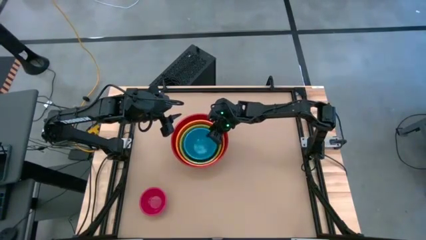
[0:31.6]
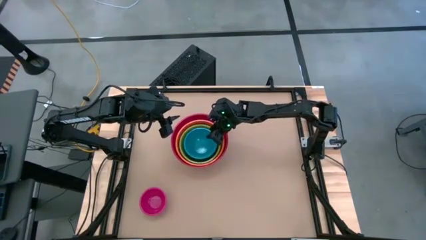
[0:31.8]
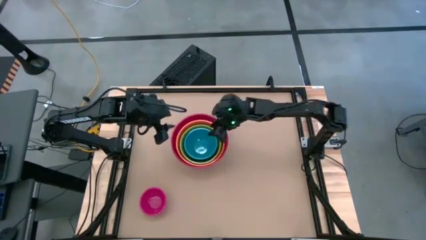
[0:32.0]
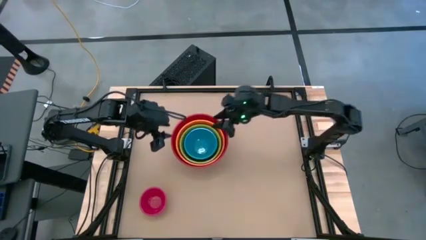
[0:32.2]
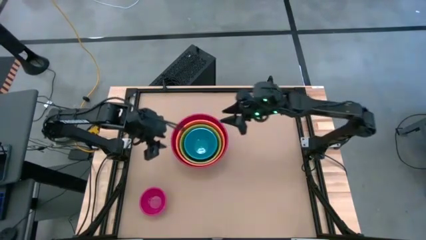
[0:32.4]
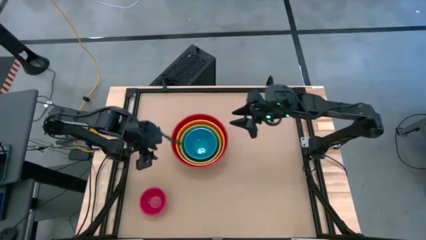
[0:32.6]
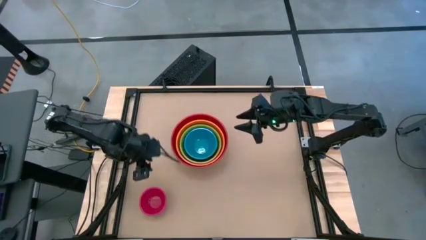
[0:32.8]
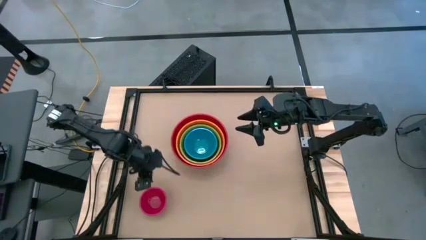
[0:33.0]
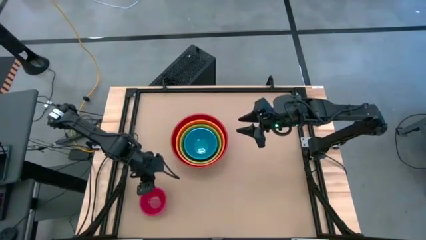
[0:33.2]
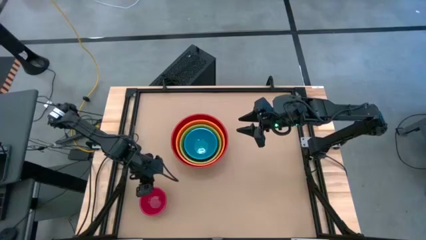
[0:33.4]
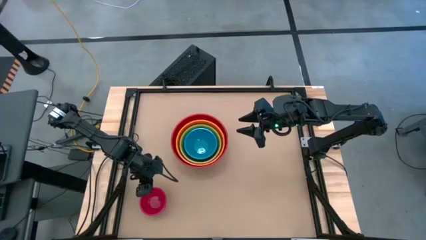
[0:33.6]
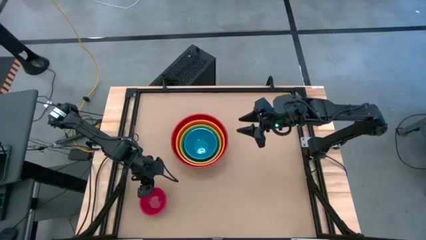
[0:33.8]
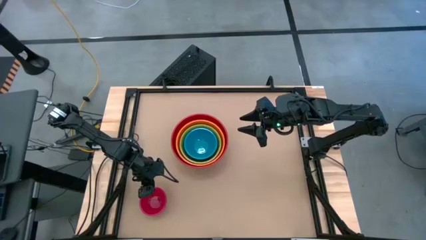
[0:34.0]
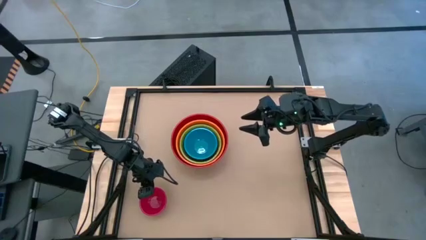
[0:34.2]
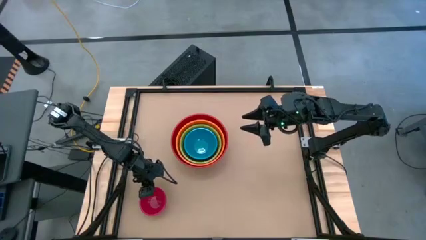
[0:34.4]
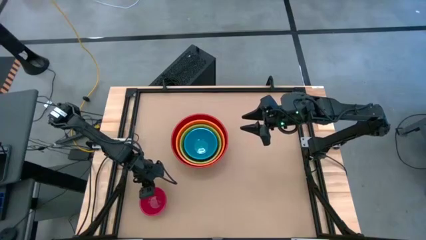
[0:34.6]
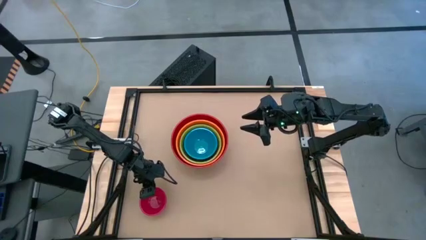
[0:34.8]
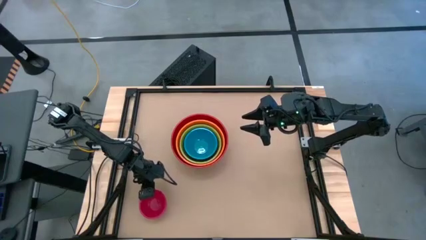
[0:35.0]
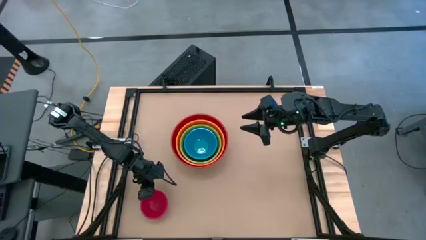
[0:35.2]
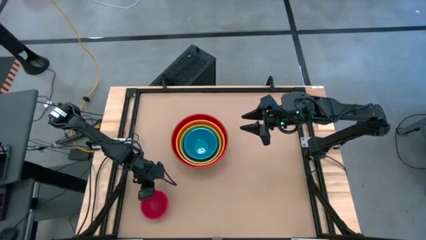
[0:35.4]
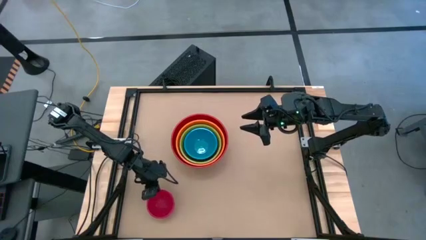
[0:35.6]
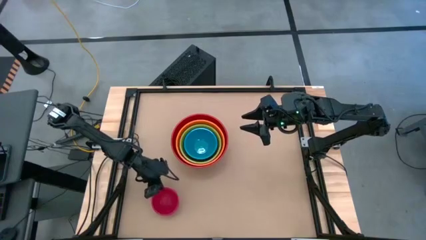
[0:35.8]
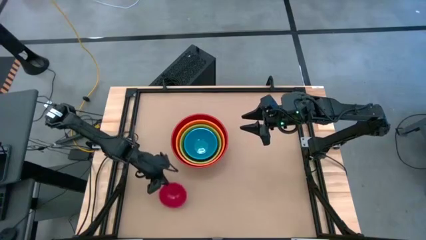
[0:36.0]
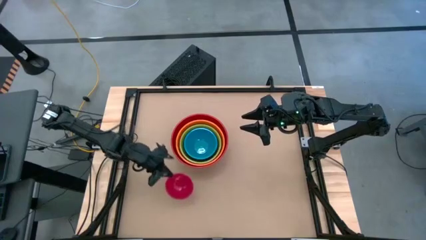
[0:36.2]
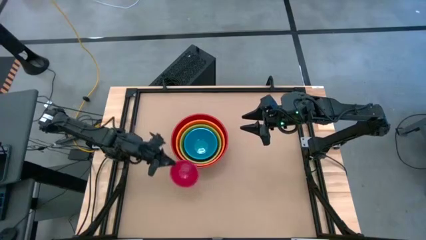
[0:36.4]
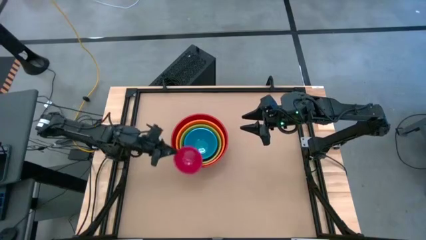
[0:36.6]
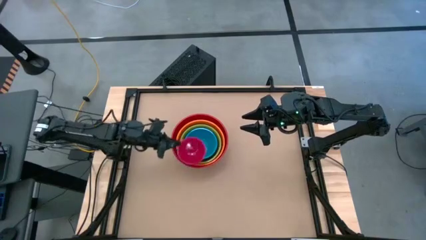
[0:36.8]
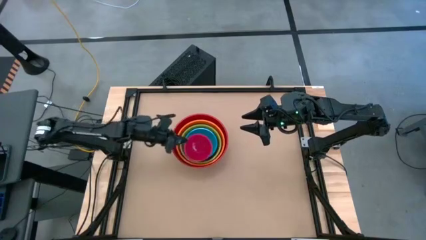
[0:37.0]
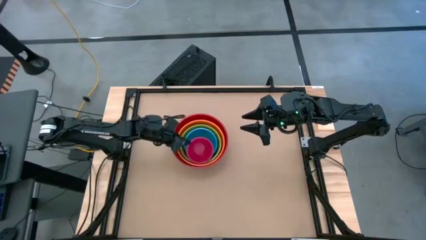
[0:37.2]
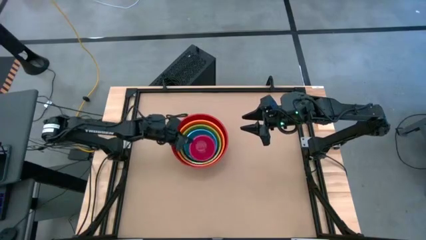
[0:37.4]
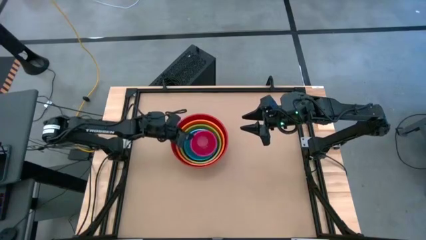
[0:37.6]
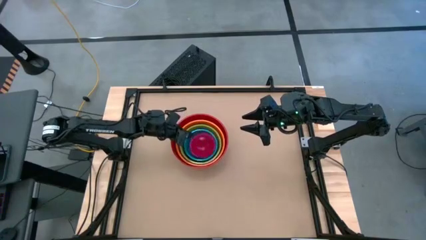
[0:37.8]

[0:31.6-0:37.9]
Stack the pink bowl on top of the blue bowl

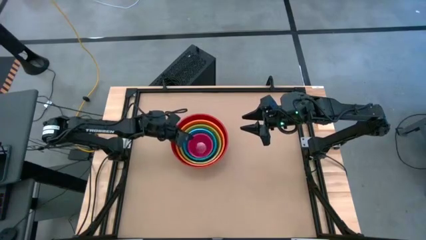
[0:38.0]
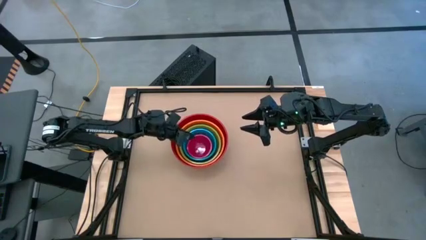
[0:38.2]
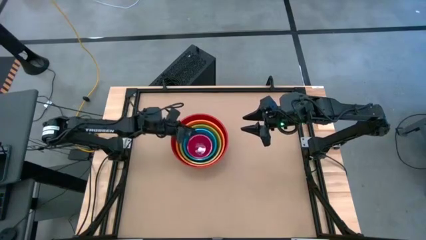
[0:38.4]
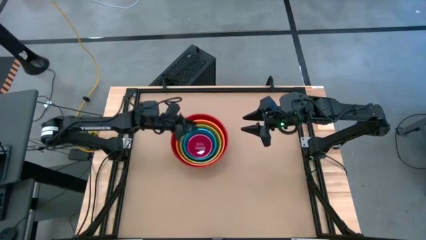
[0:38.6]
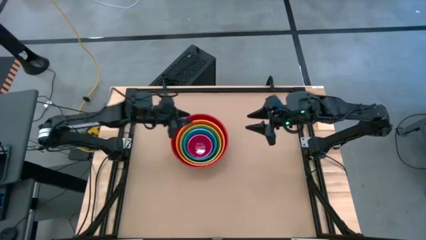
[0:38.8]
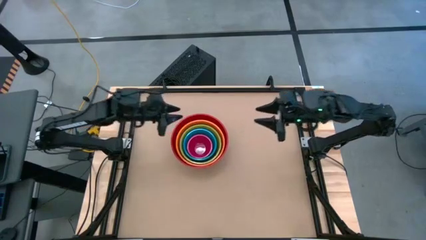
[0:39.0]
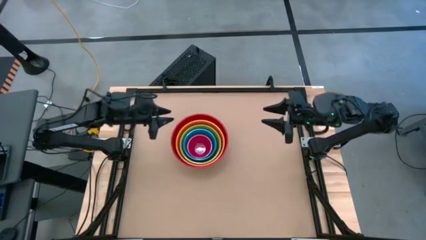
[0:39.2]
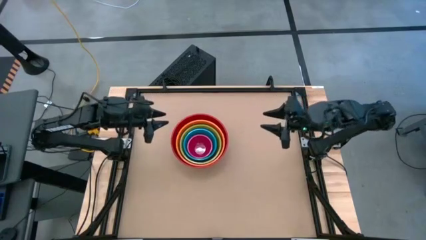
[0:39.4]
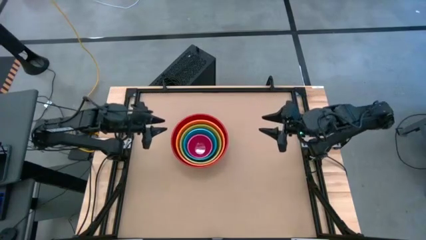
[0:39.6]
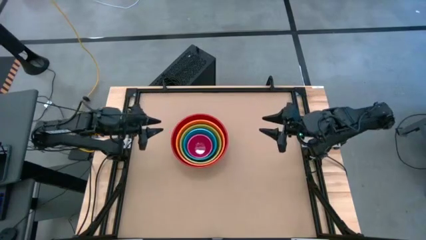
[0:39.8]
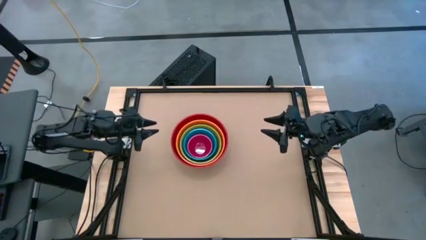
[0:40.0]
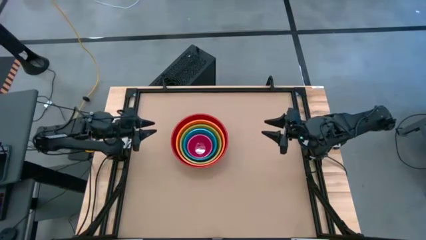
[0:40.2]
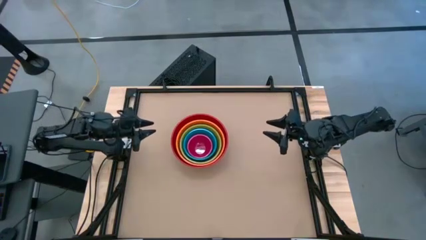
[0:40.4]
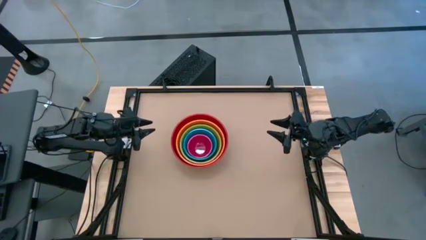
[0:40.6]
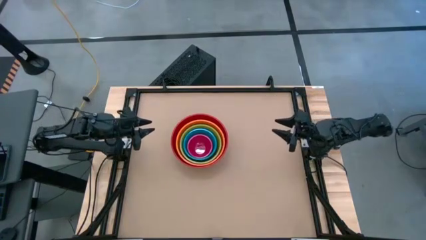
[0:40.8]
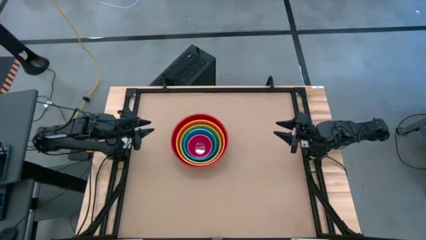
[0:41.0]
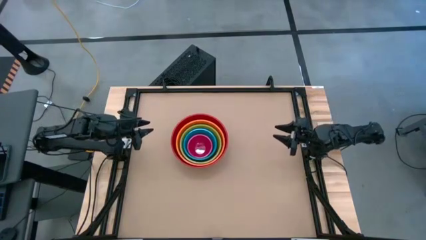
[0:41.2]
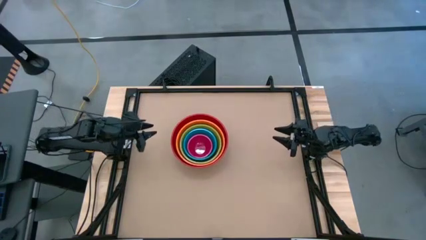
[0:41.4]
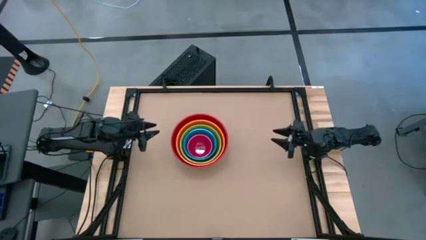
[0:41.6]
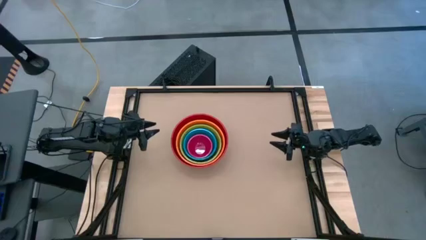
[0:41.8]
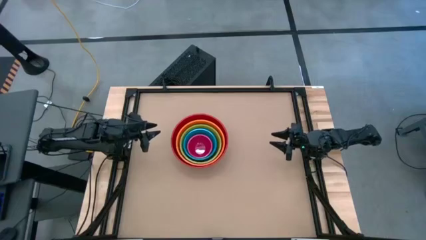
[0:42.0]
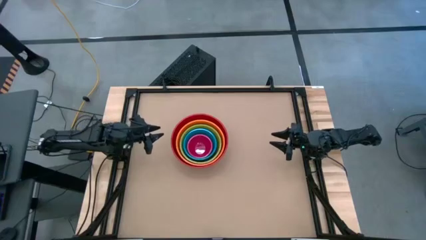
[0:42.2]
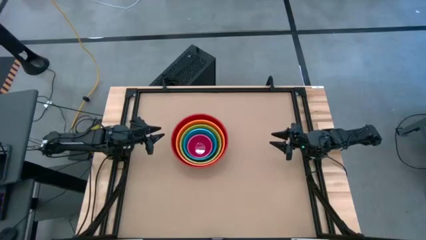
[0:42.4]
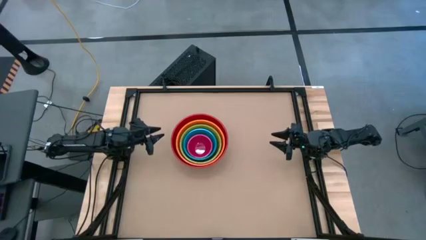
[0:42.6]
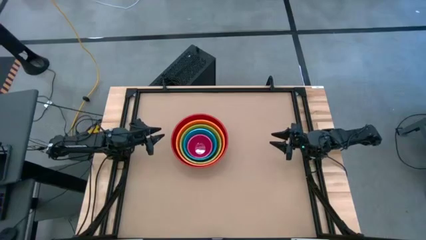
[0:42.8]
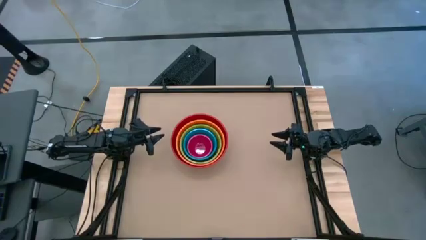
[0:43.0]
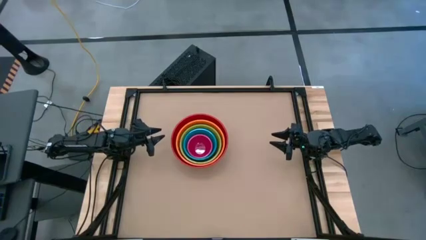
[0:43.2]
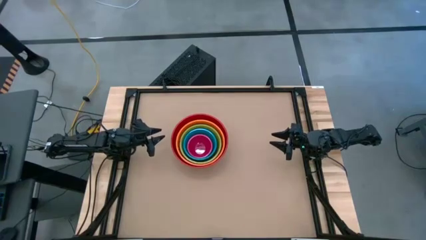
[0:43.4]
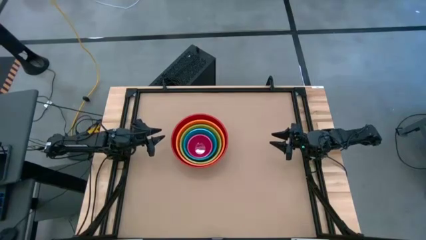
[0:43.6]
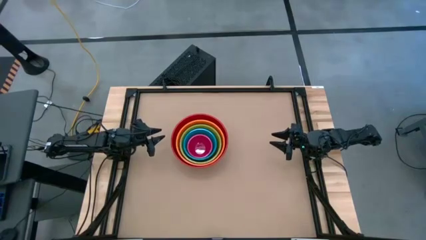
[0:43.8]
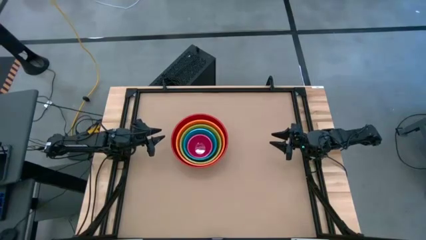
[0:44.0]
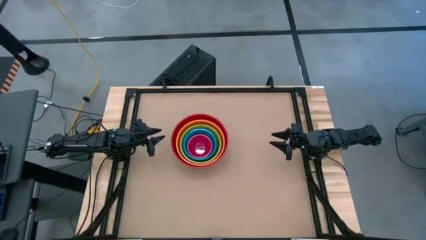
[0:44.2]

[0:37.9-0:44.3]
Return to Home Position
